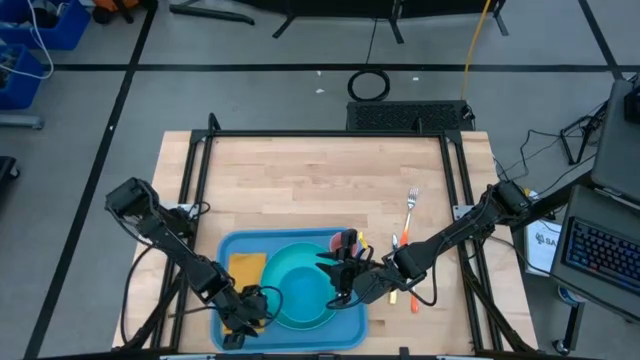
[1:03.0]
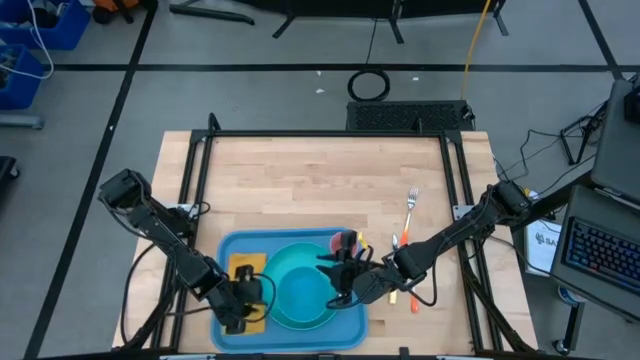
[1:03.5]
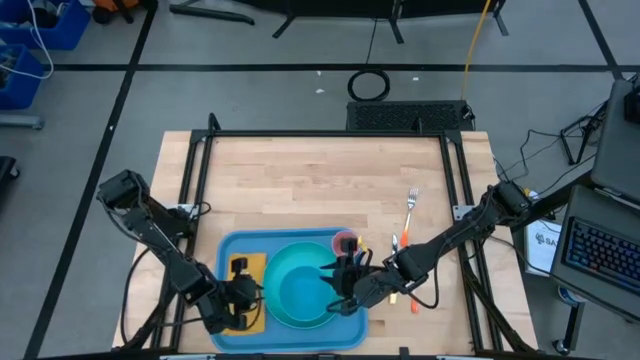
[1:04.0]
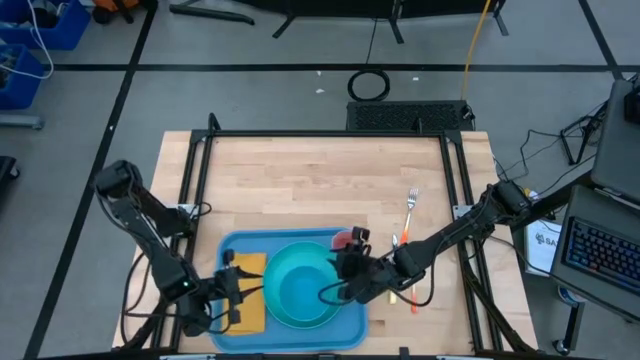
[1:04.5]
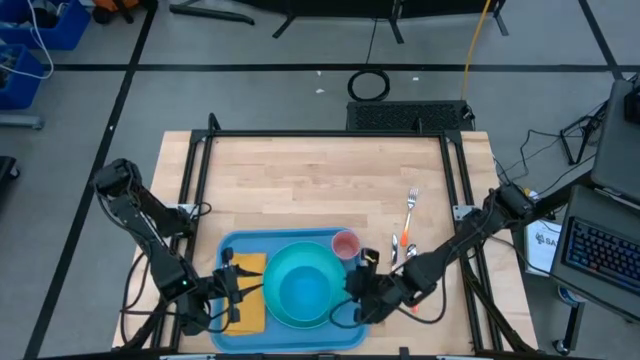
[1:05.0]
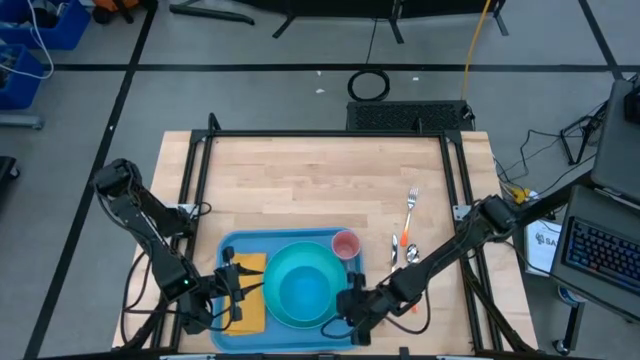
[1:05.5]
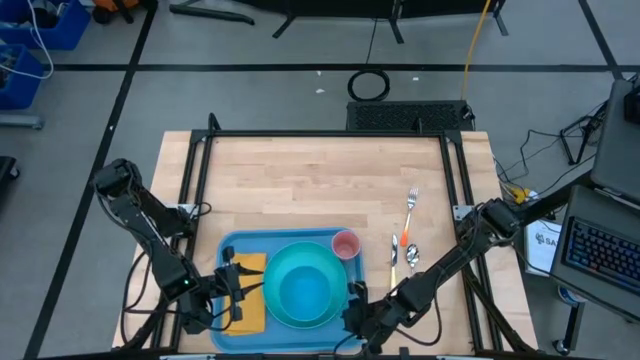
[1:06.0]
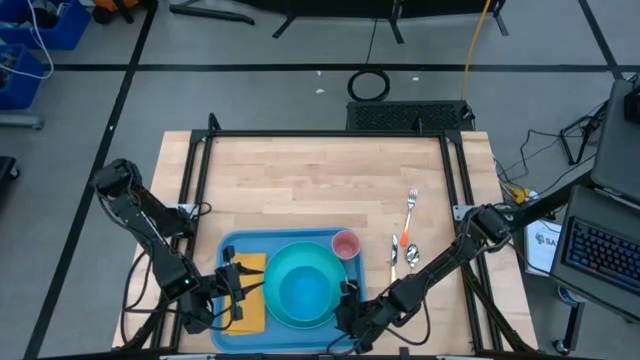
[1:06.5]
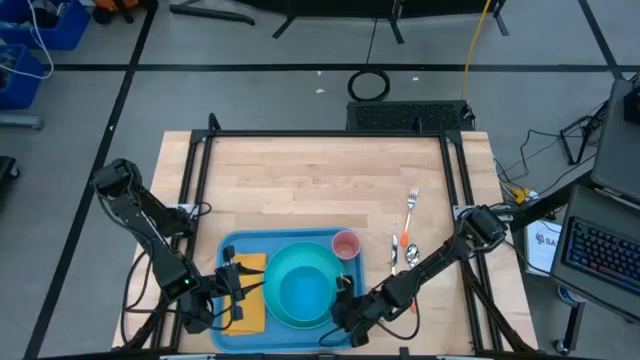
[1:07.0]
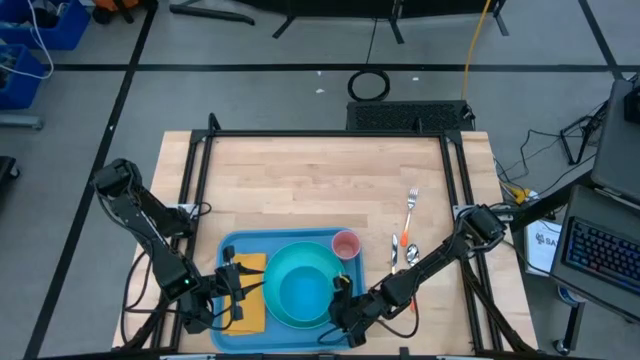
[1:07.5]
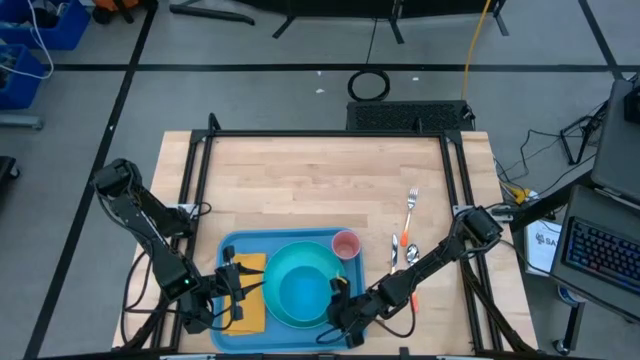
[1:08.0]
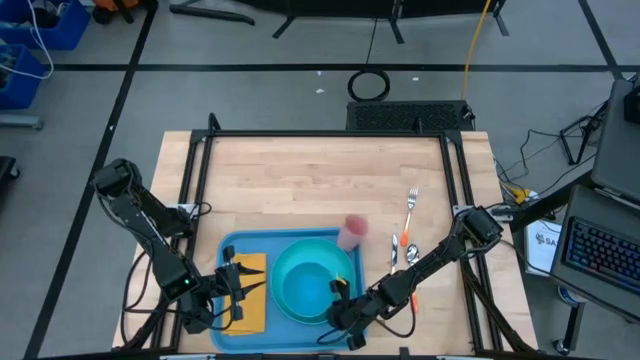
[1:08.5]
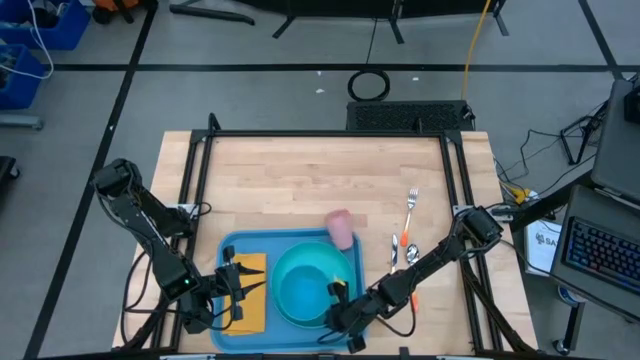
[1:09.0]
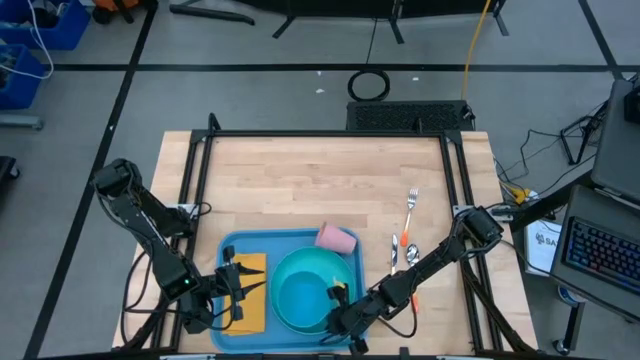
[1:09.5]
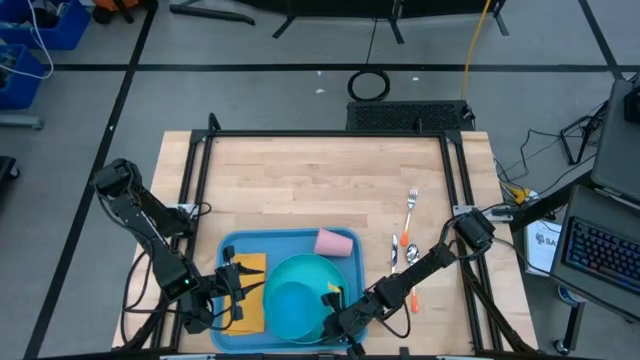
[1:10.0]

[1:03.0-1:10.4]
Task: Set up tray
Adjust the green plate on the blue tray

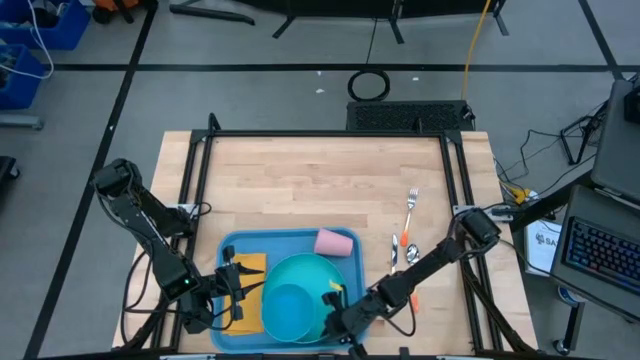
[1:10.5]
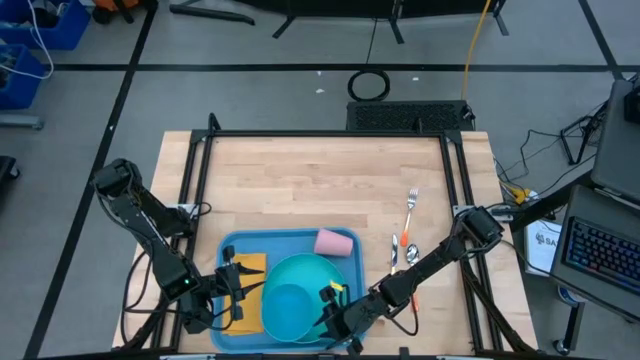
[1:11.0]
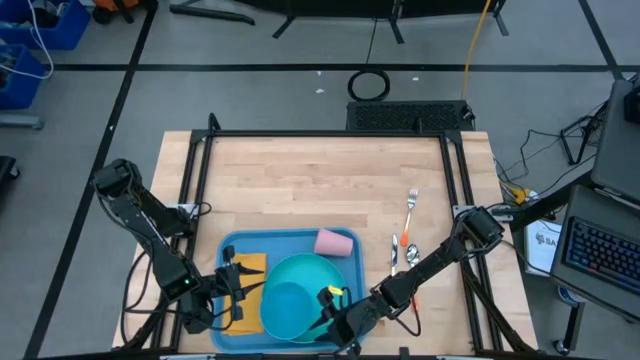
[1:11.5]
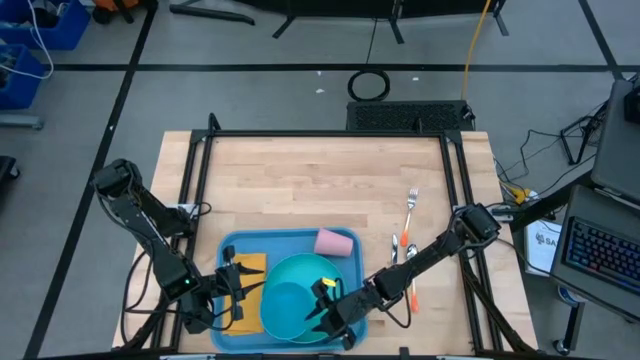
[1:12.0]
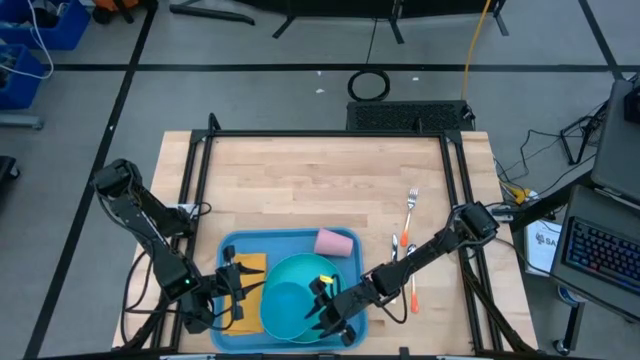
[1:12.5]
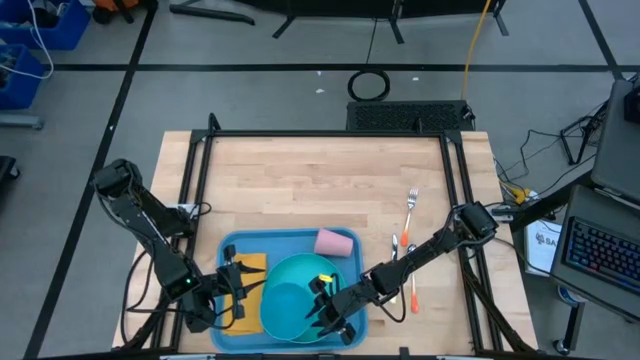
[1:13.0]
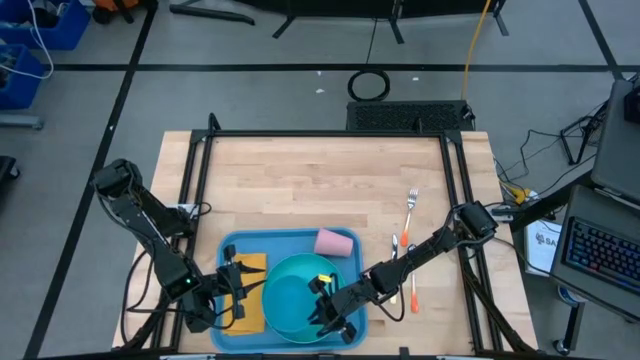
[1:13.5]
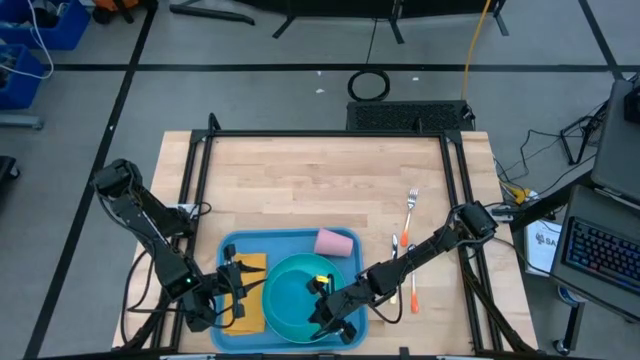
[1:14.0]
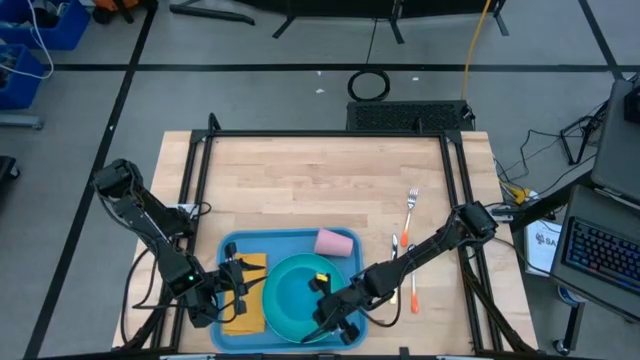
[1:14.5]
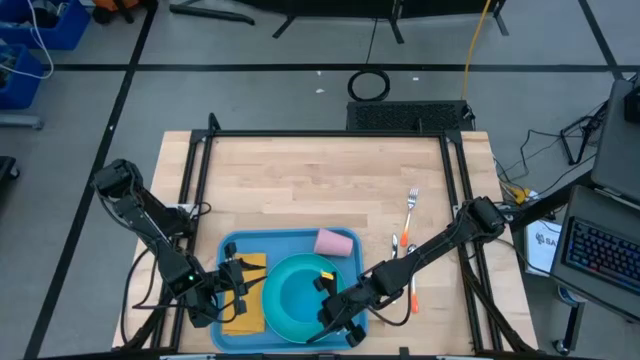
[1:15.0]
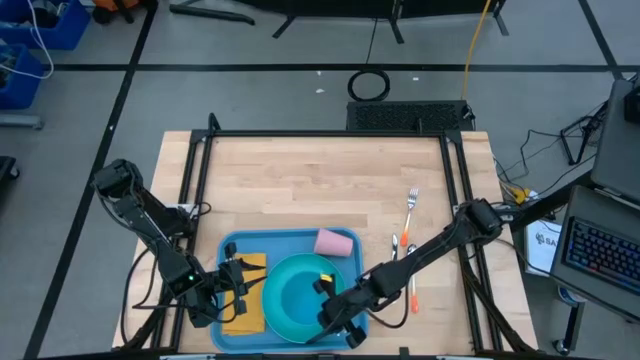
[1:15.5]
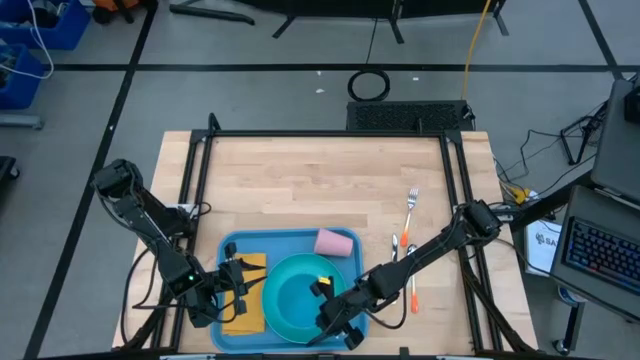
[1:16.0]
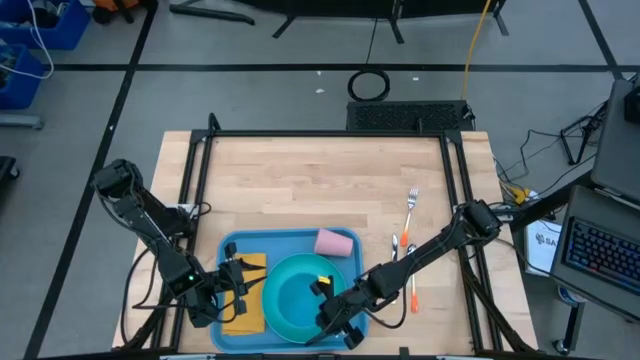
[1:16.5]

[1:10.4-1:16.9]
Adjust the blue bowl on the green plate in the blue tray
